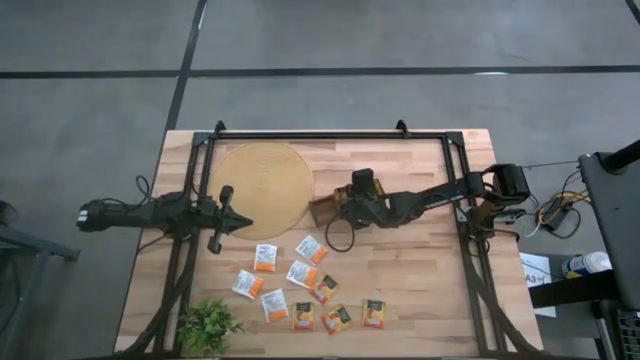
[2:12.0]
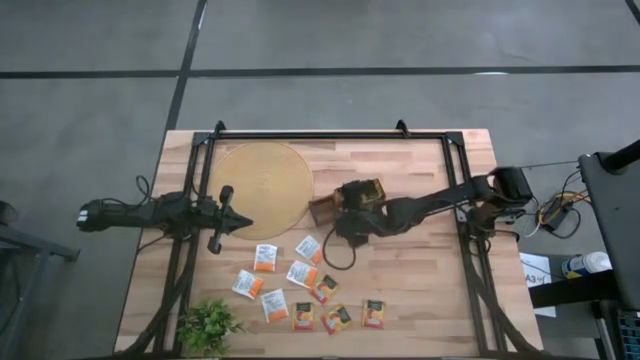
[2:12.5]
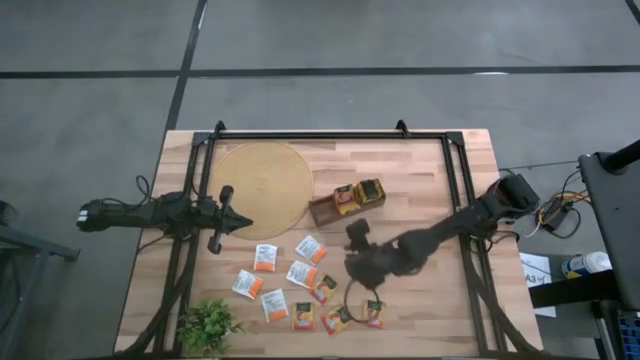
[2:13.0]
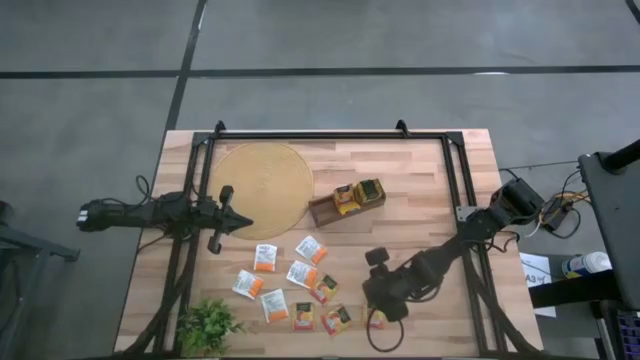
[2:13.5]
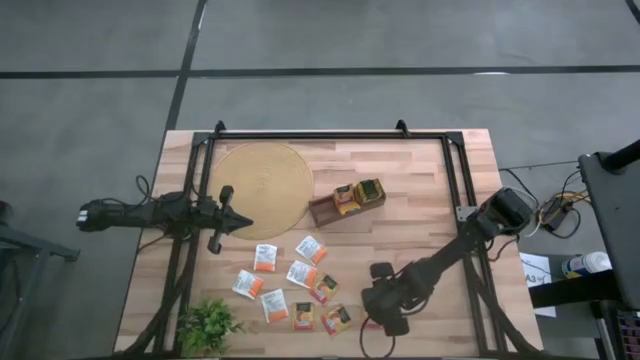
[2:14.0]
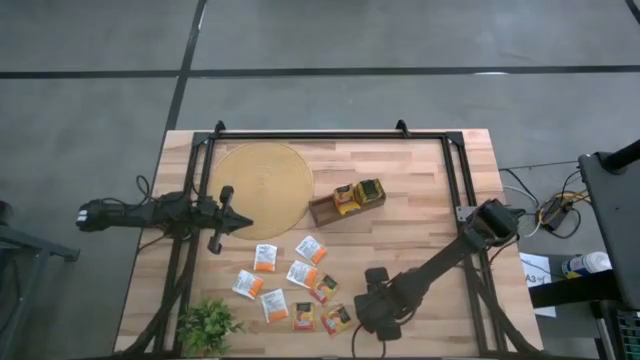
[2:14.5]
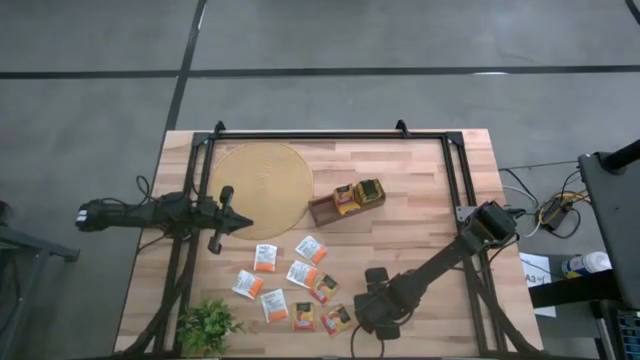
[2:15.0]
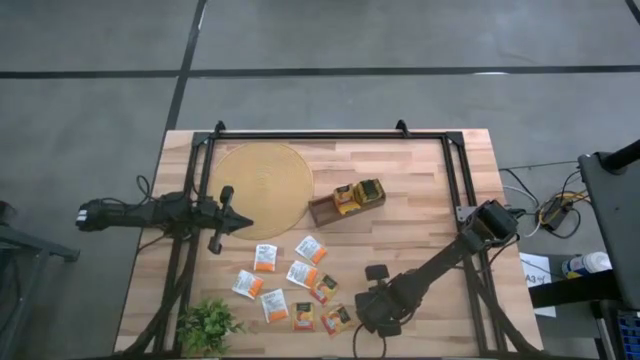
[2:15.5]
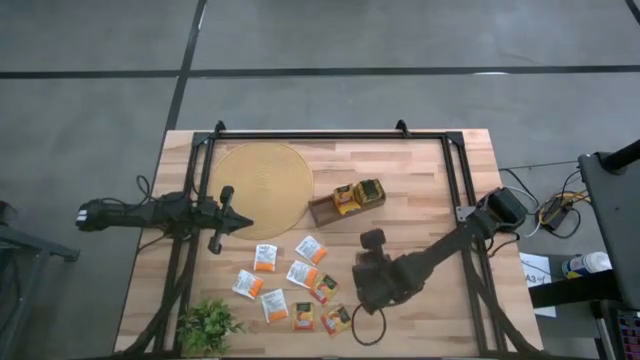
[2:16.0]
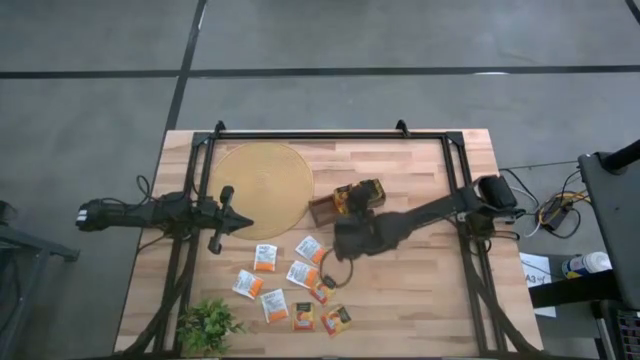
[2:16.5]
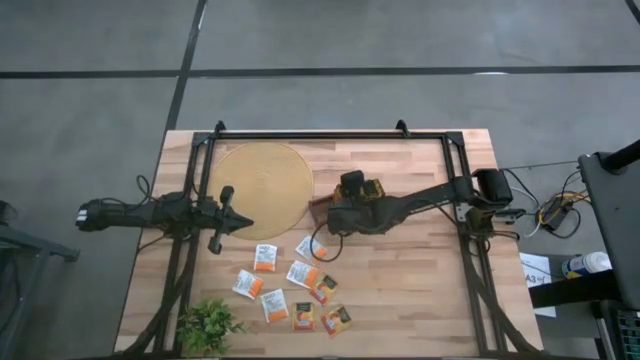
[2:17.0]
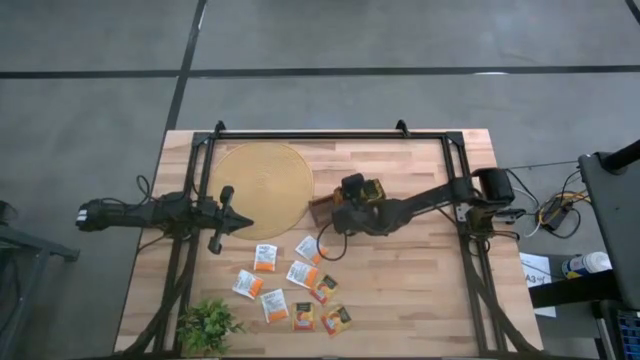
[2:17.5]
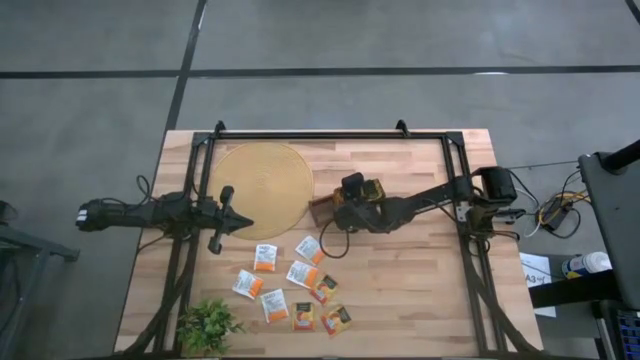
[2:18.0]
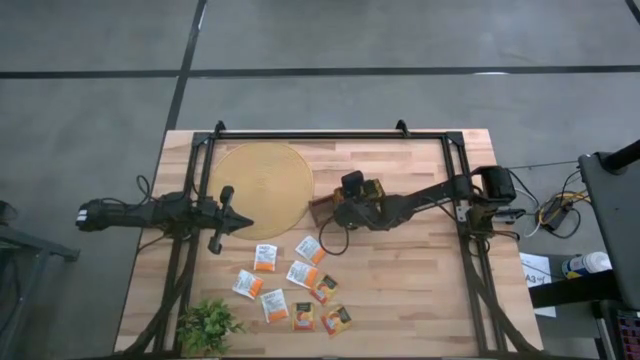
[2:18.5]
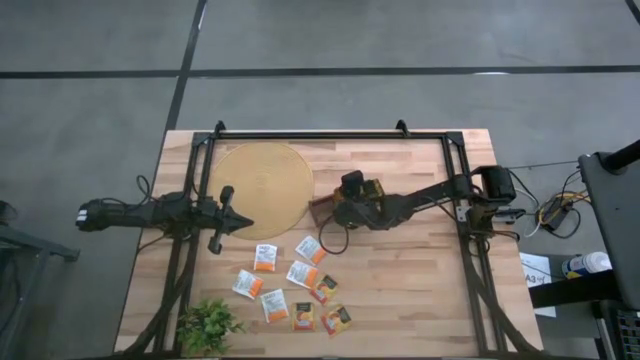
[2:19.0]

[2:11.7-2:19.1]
Task: Pick & Place Tea
Put the orange tea bag into the middle section of the wooden organizer

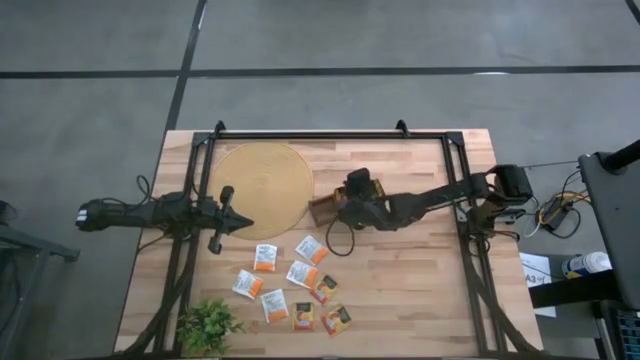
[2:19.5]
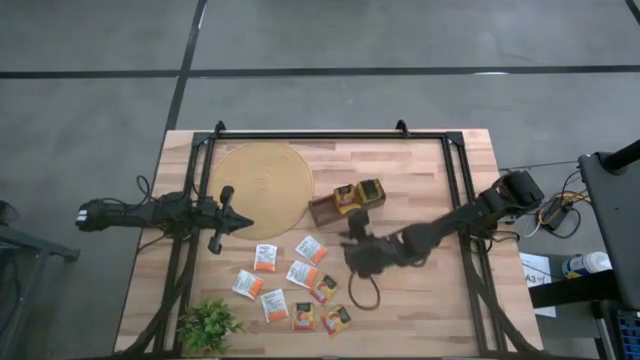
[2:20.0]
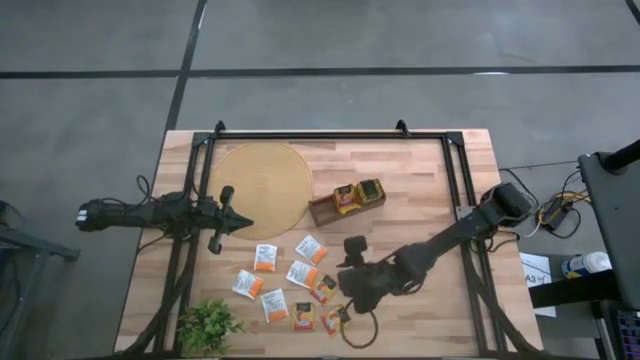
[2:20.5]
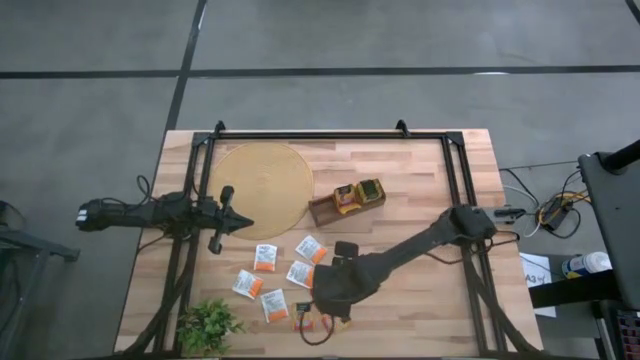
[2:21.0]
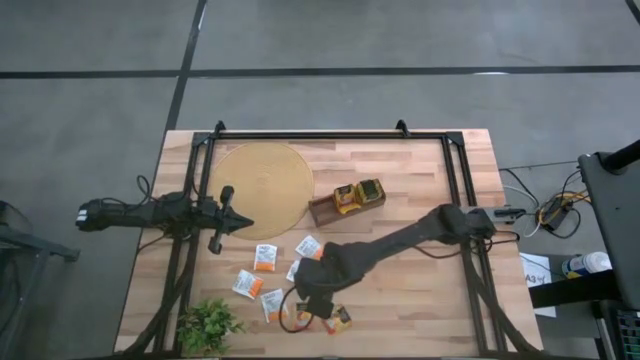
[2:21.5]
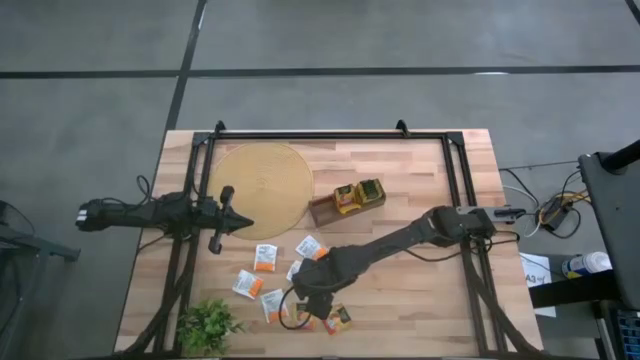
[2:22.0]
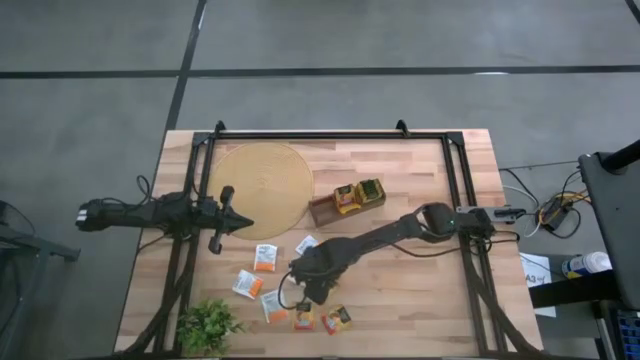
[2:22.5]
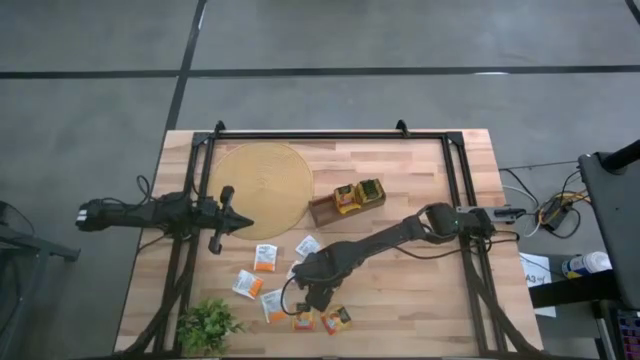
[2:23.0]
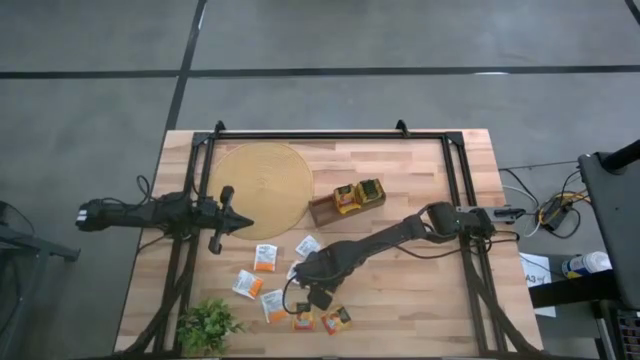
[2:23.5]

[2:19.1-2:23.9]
Put the orange tea bag into the middle section of the wooden organizer

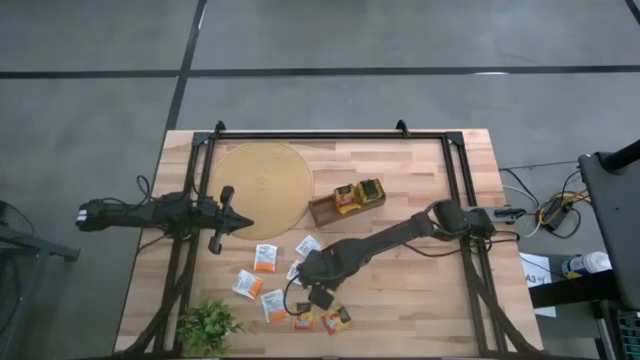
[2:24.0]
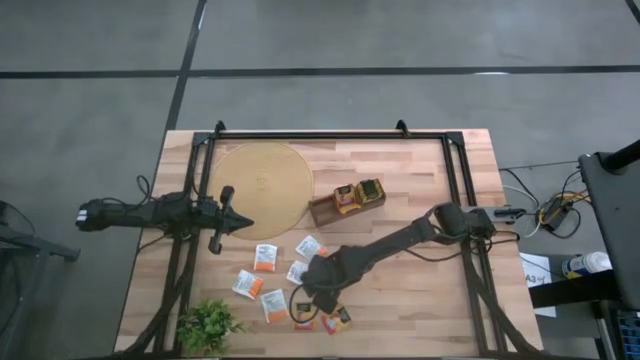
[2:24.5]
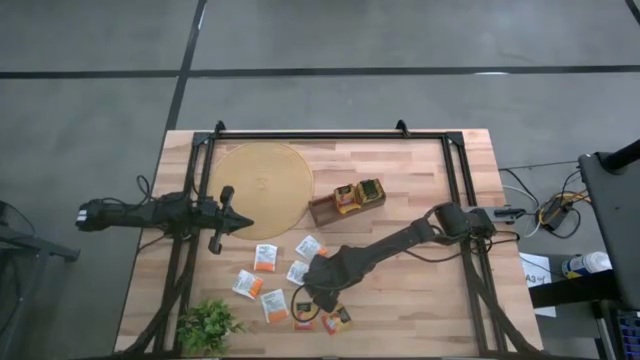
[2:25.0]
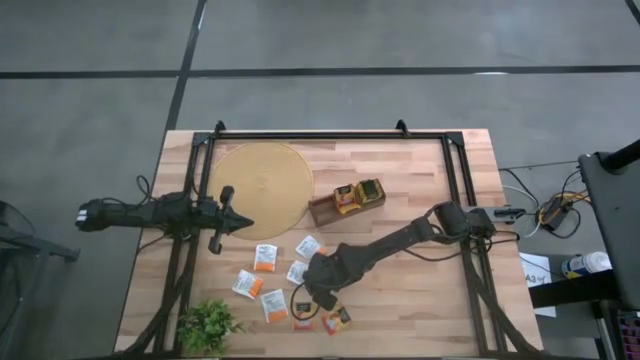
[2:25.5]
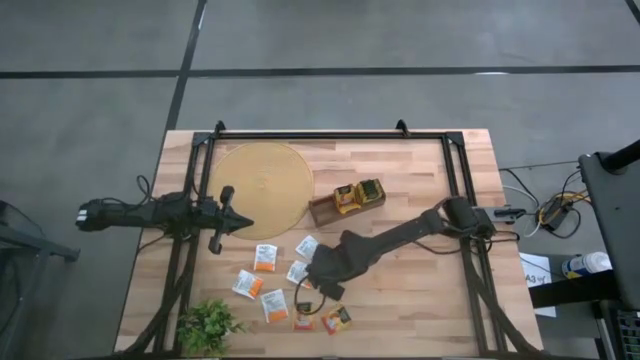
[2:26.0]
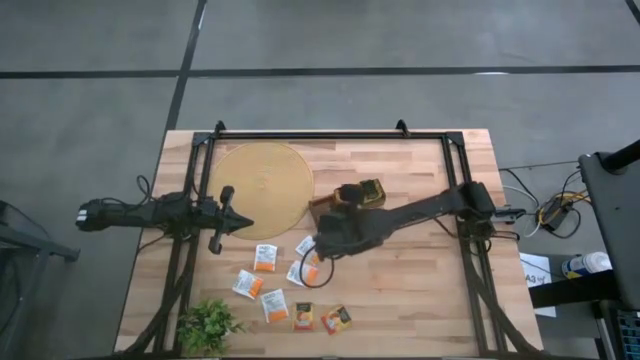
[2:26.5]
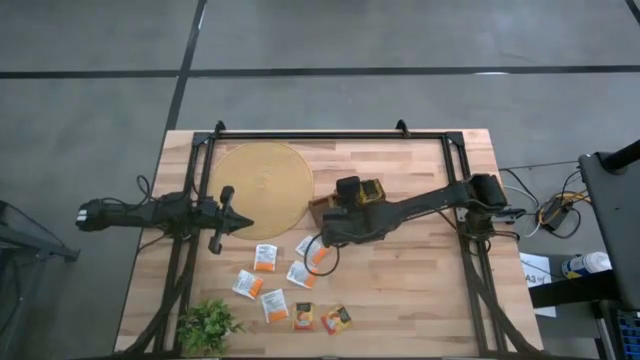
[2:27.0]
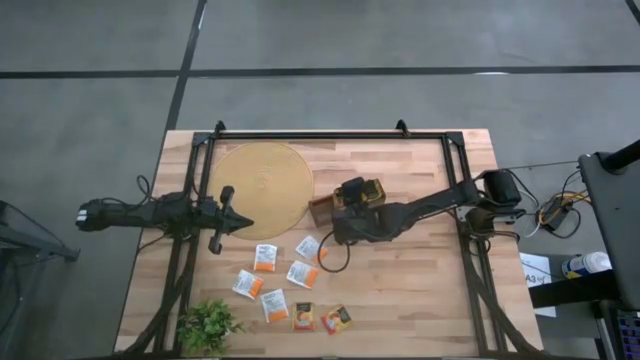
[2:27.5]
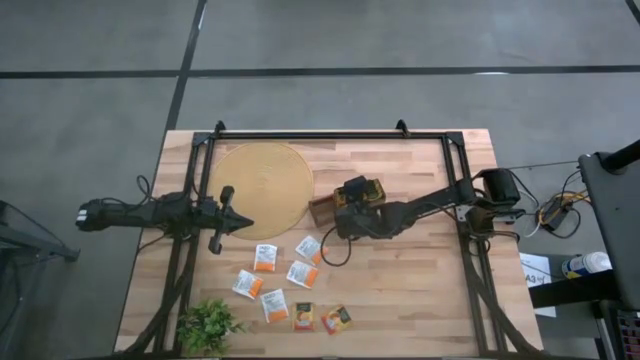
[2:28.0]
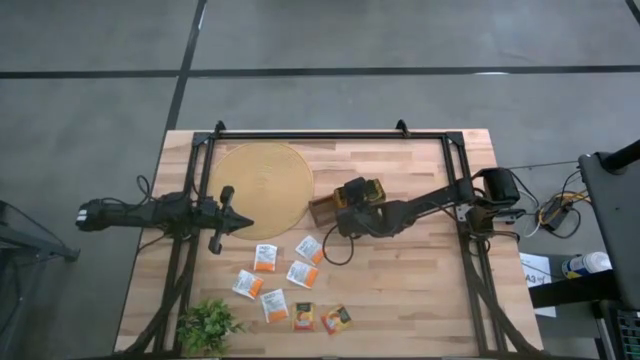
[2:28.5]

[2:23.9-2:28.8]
Put the orange tea bag into the middle section of the wooden organizer
